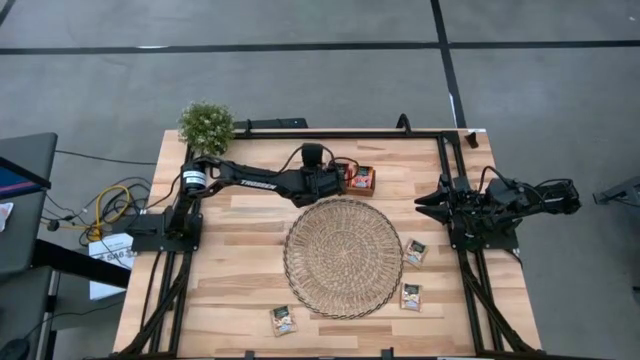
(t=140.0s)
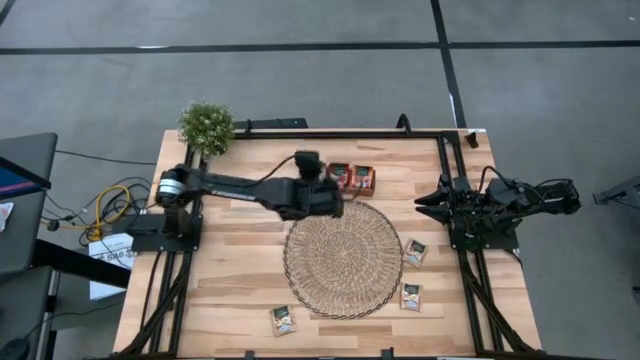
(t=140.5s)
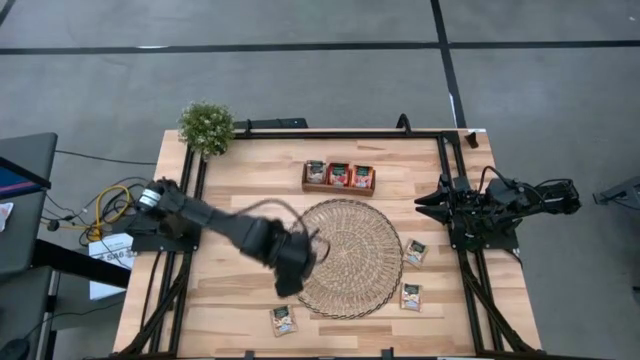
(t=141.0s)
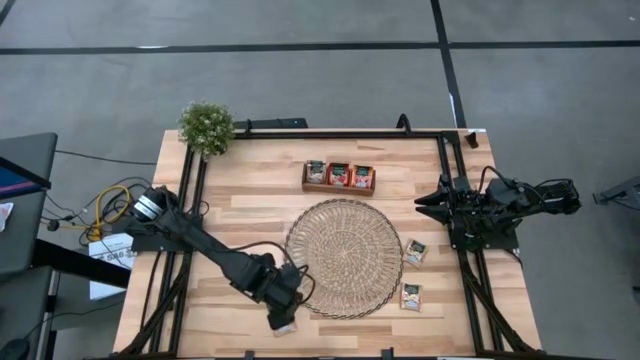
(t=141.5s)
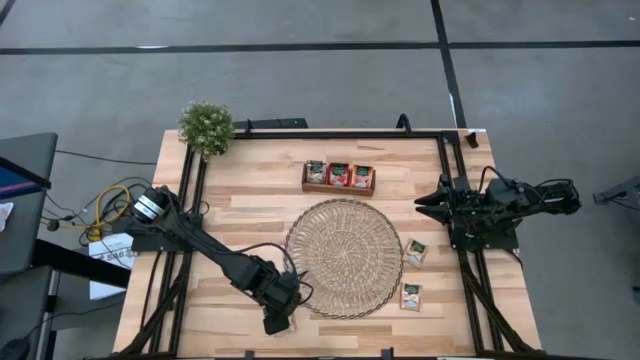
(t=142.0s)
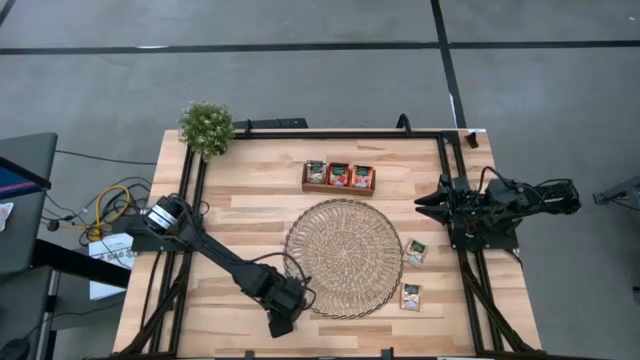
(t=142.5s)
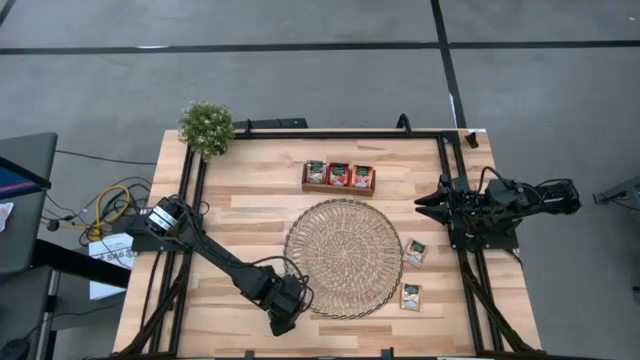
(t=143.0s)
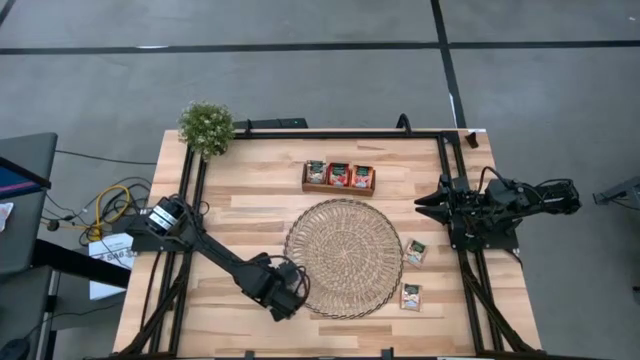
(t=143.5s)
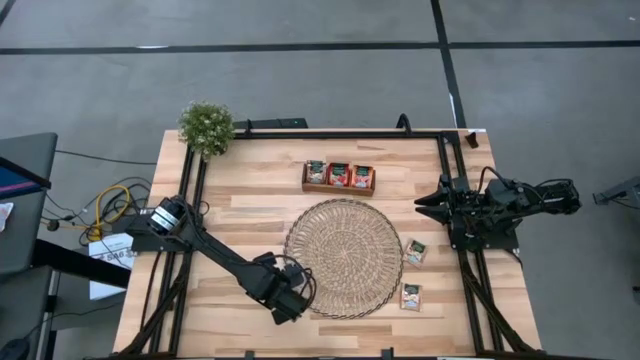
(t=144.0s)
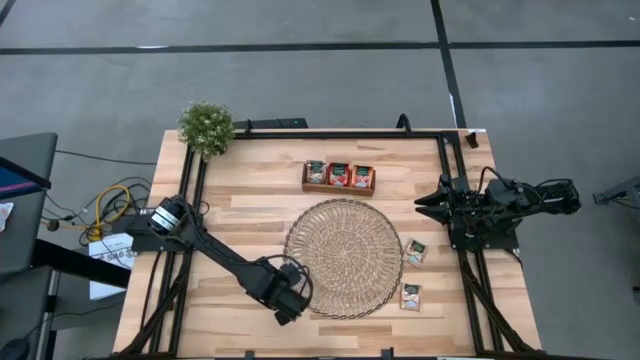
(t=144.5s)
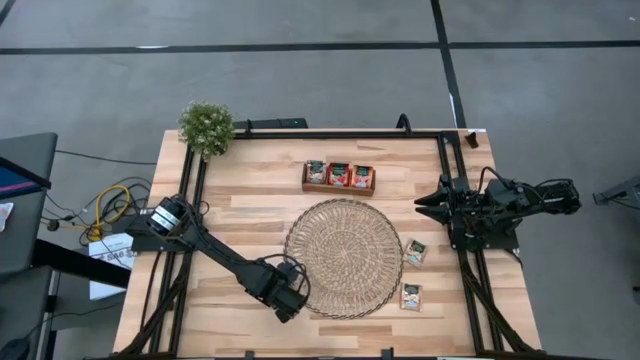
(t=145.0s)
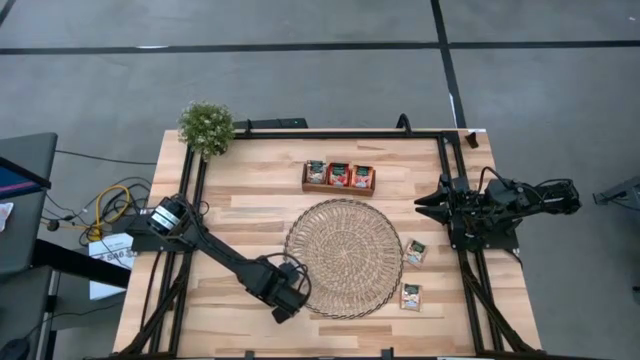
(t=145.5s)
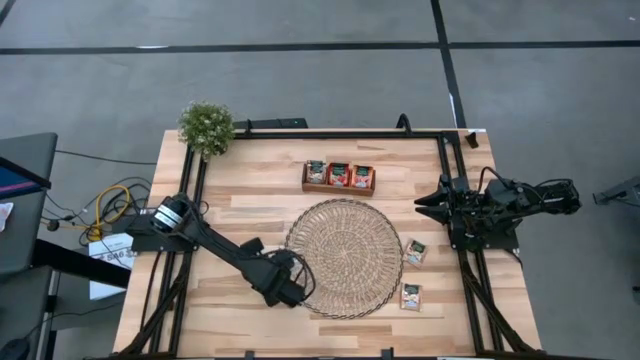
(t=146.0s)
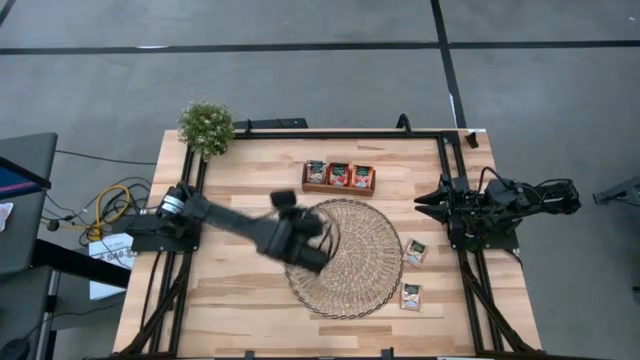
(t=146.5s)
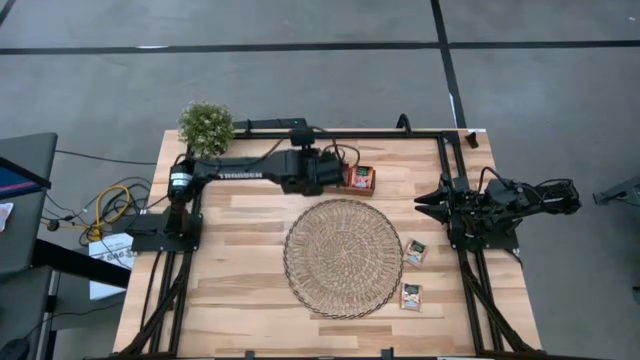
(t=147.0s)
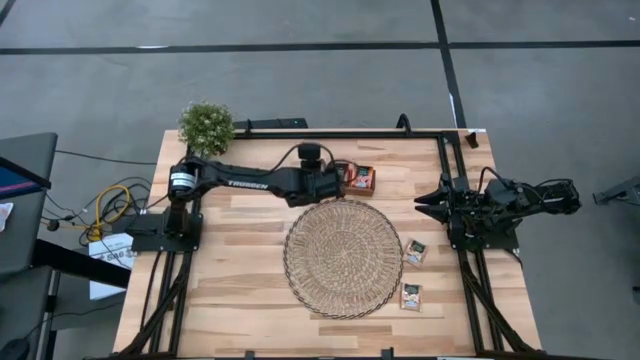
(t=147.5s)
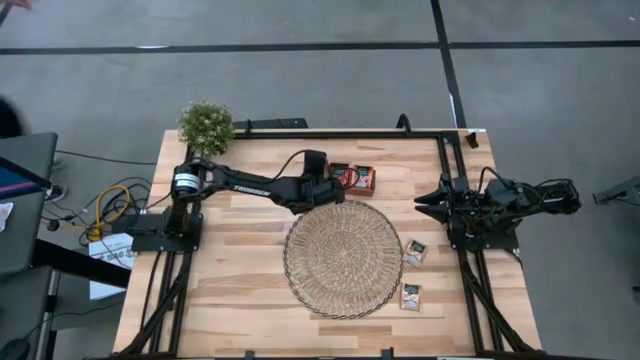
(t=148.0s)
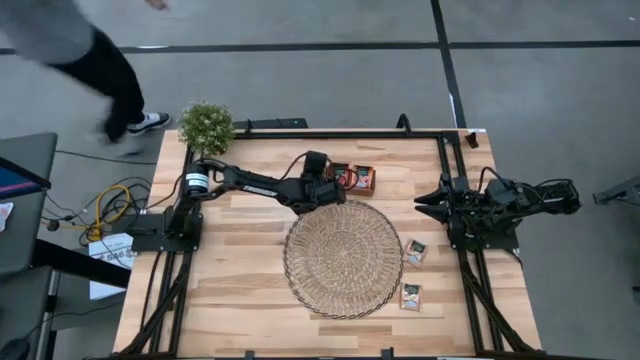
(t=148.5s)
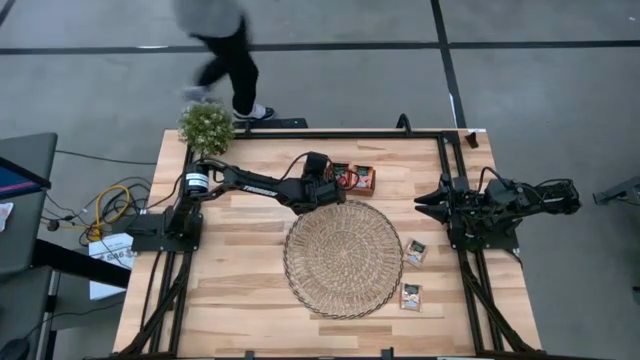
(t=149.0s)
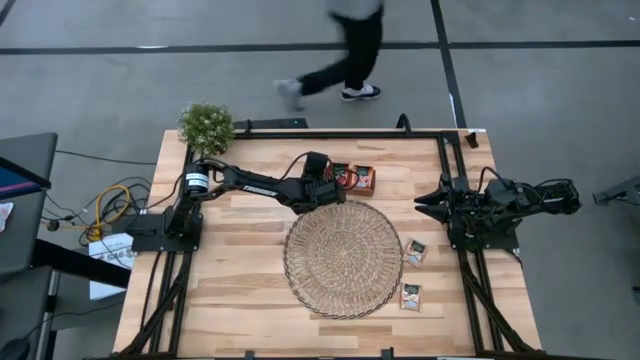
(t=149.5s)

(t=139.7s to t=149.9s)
Task: Pick & Place Tea
Put the brown tea bag into the left section of the wooden organizer

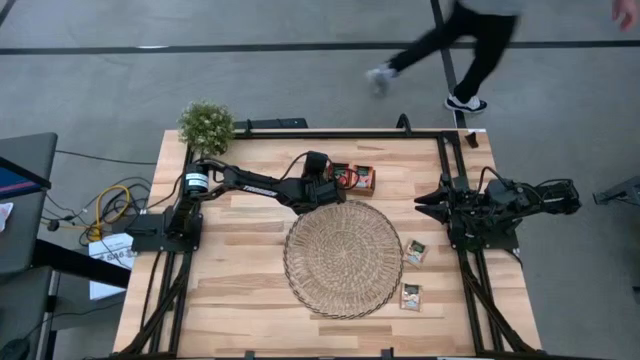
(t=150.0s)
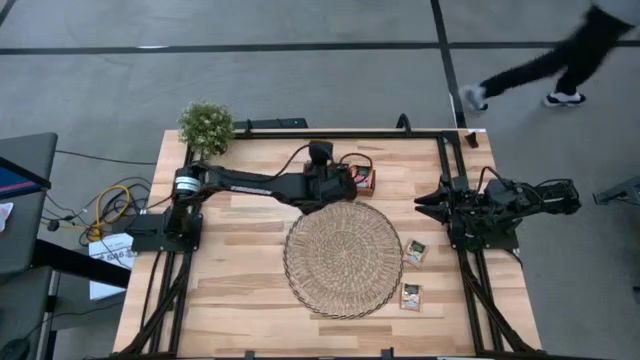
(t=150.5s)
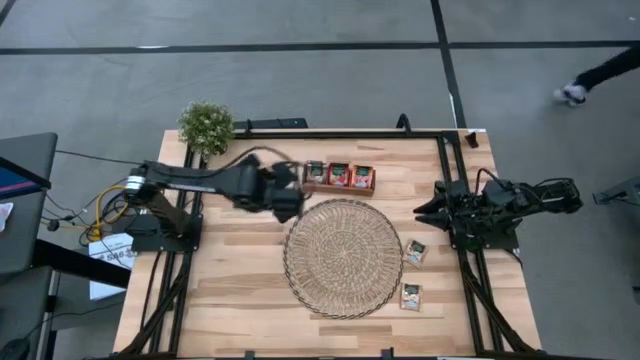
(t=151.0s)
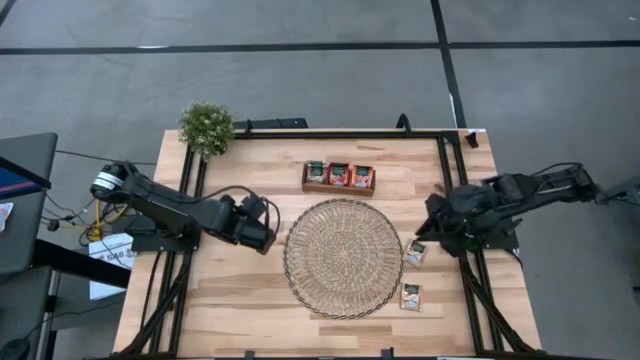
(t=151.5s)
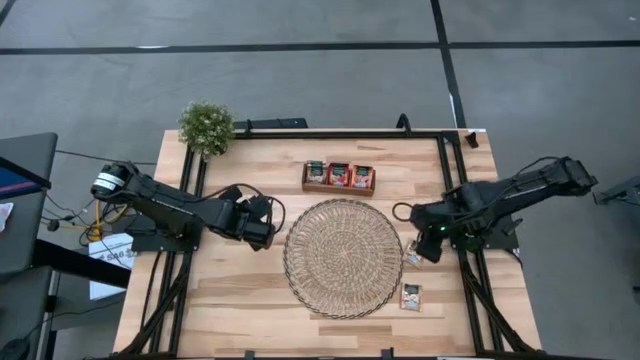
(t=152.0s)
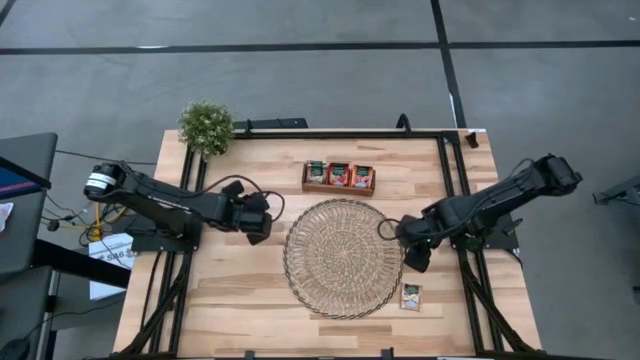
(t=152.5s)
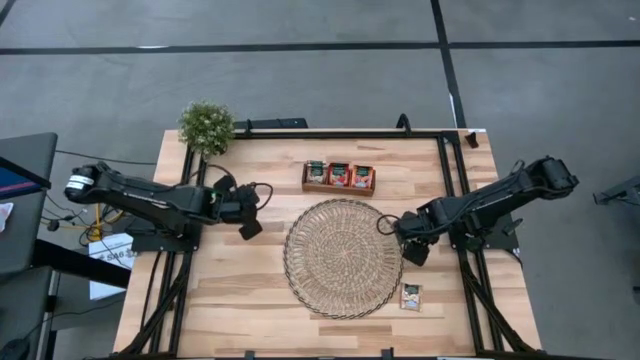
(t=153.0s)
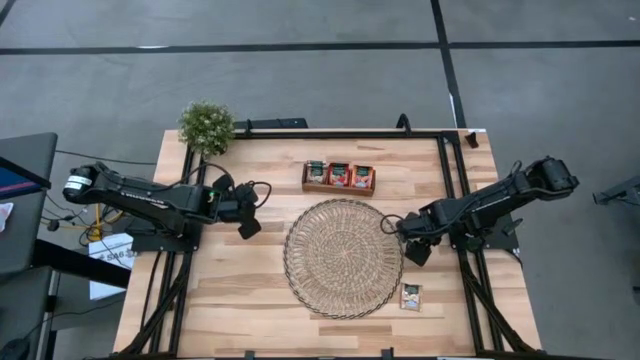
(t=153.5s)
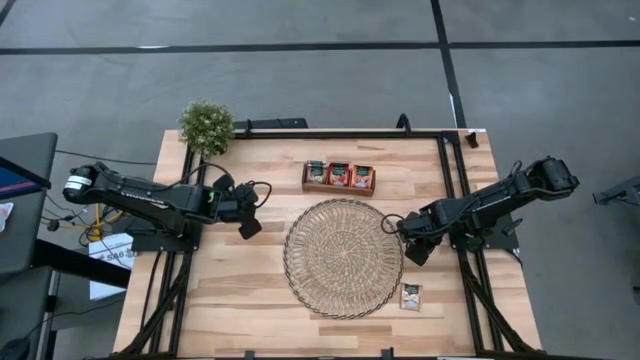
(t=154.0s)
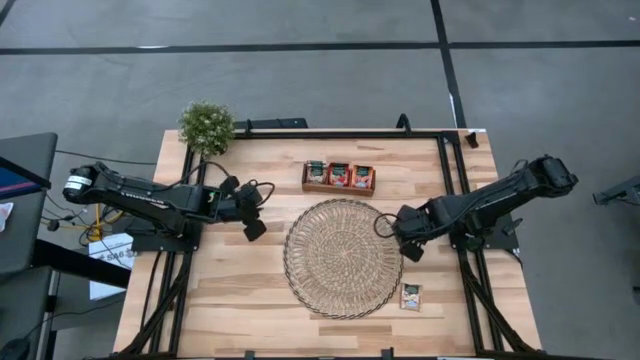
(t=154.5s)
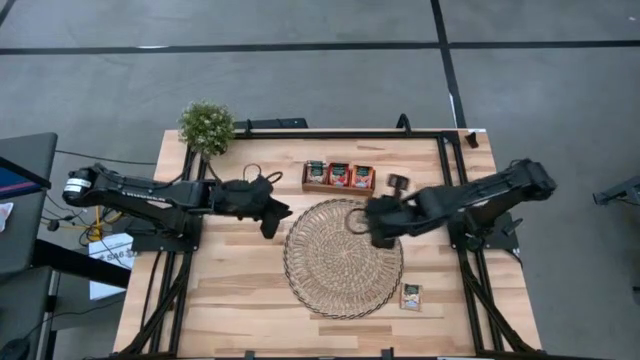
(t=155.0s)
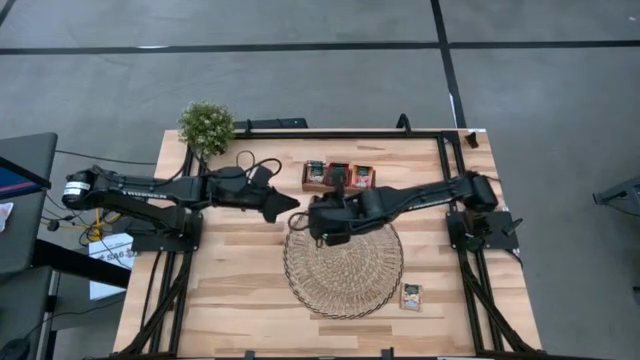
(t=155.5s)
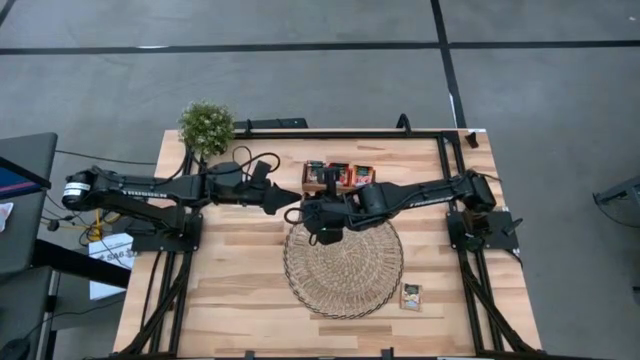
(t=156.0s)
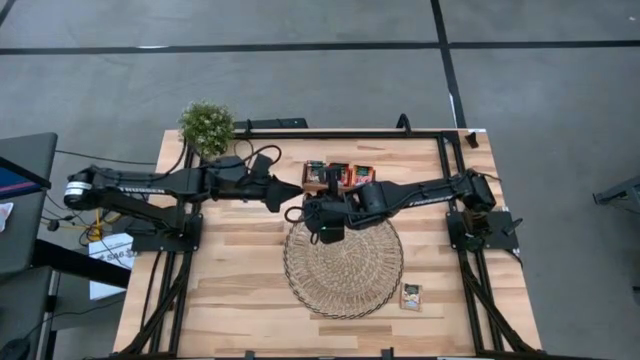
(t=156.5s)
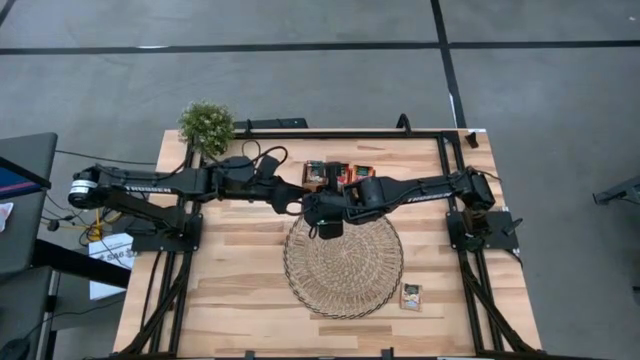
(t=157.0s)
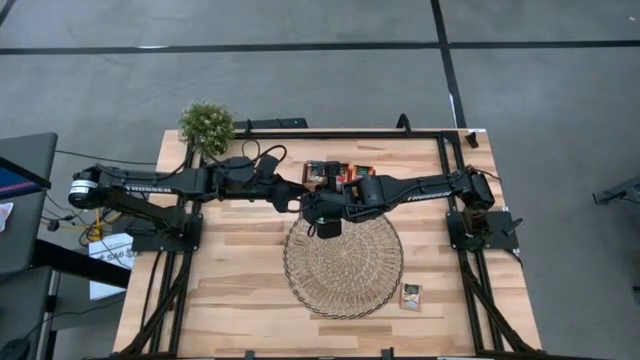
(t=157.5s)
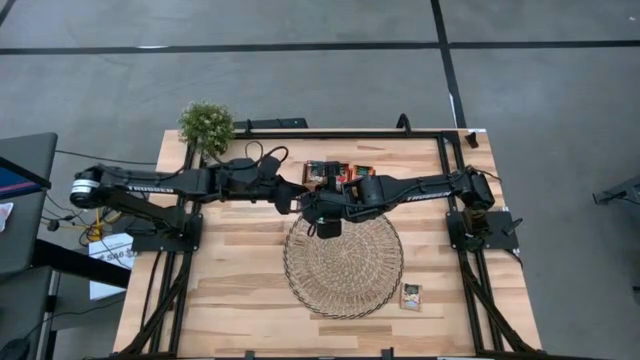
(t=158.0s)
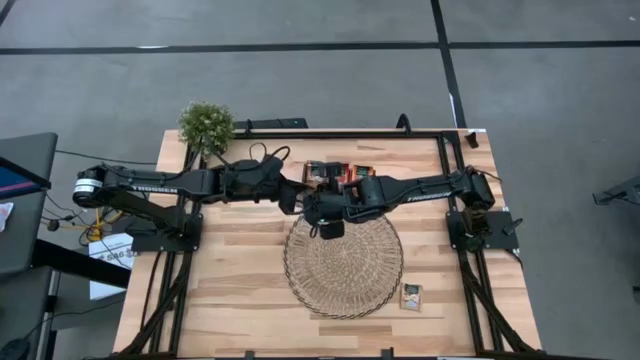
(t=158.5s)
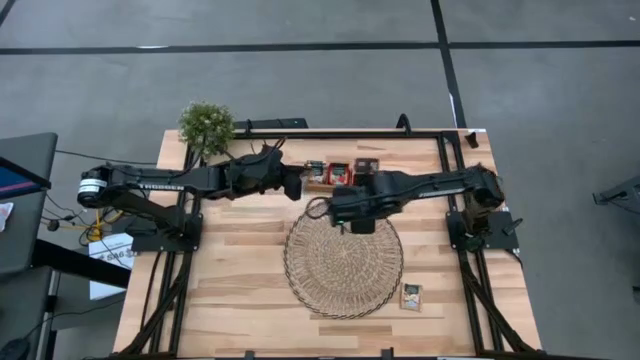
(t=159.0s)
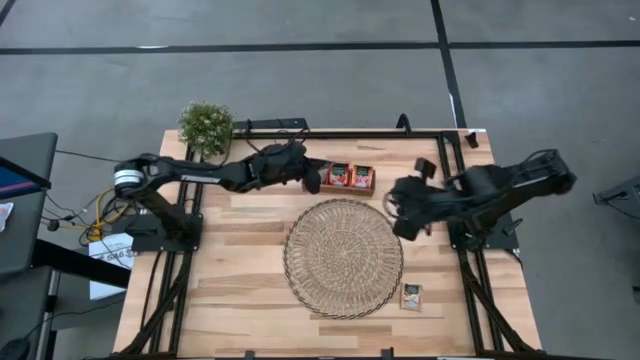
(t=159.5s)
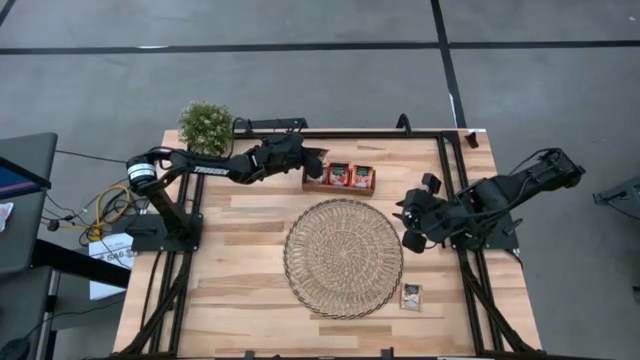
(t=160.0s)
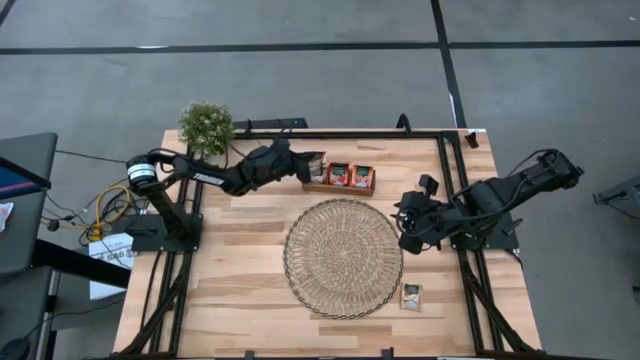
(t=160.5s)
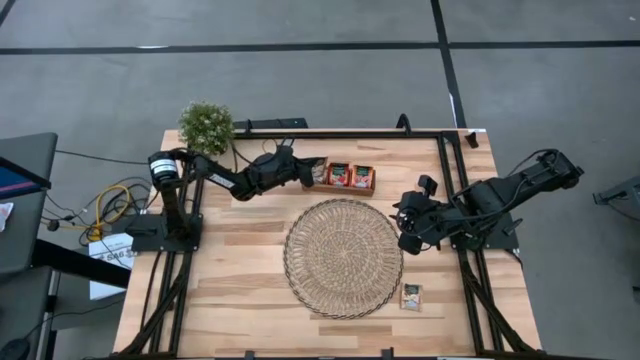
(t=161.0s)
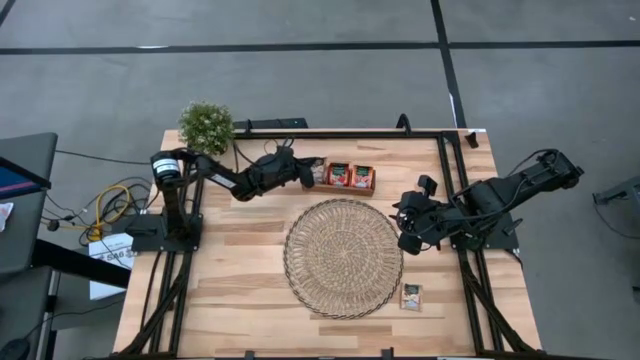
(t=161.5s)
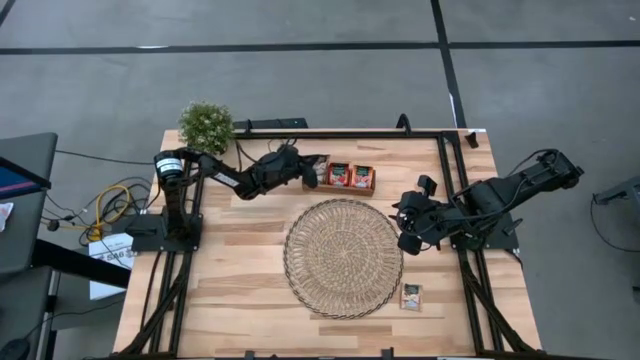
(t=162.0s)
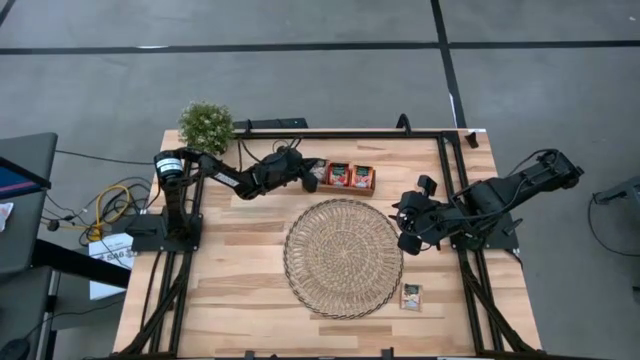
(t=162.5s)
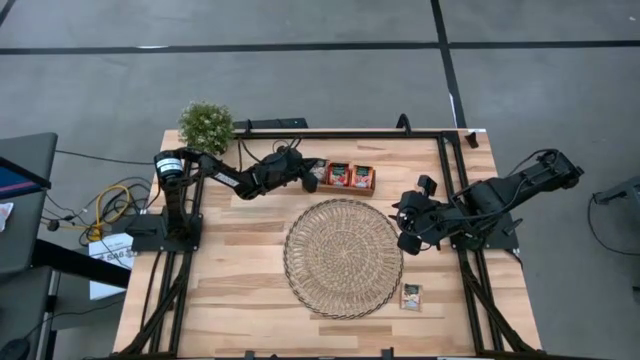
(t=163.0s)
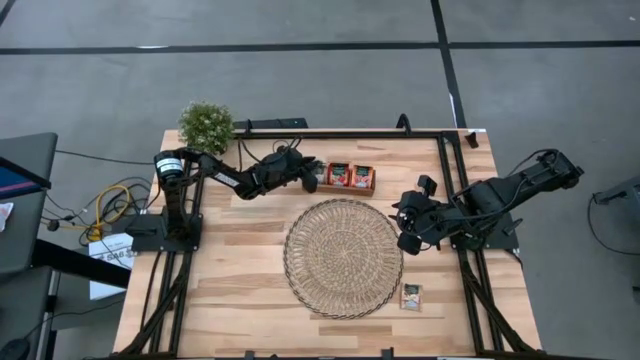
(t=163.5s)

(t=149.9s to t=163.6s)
Put the brown tea bag into the left section of the wooden organizer
